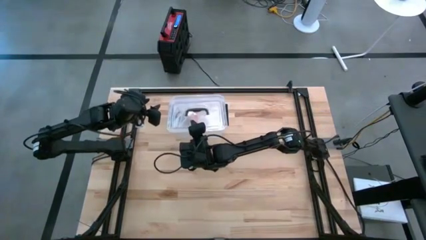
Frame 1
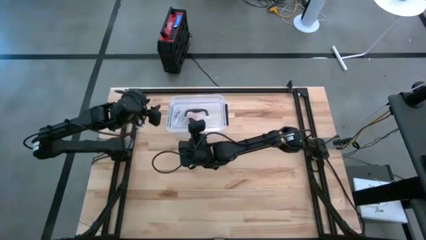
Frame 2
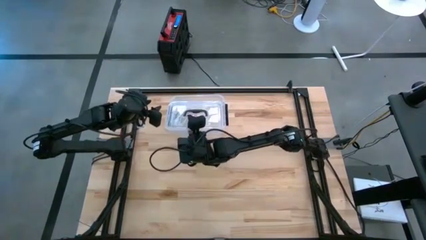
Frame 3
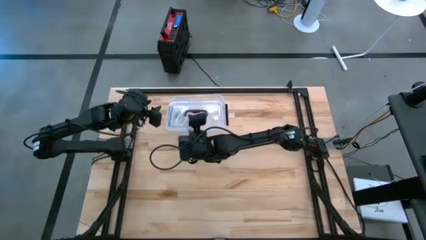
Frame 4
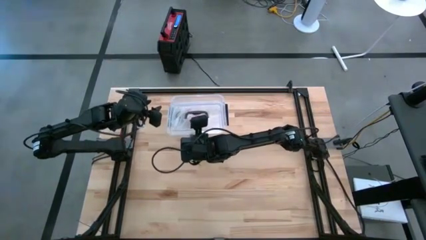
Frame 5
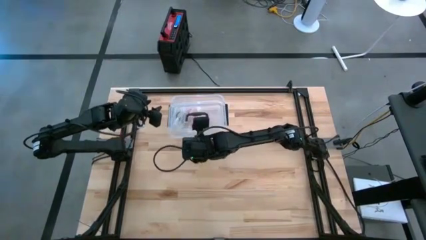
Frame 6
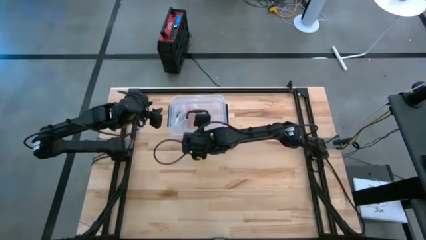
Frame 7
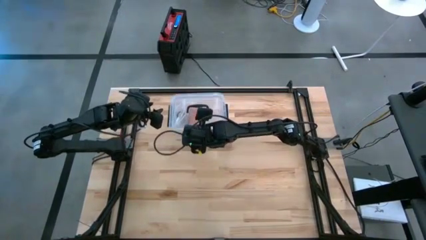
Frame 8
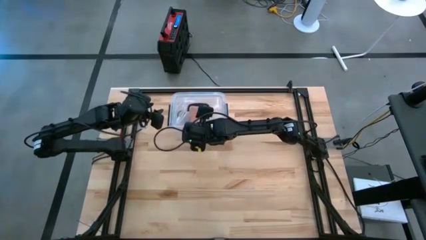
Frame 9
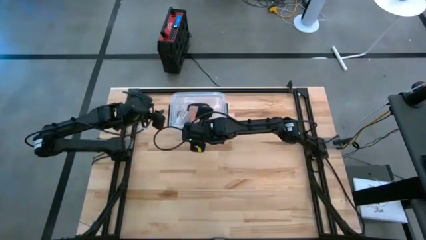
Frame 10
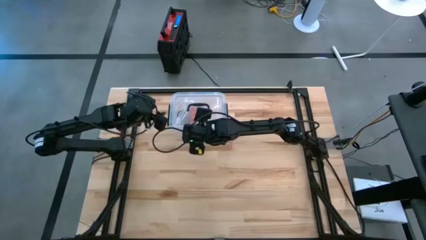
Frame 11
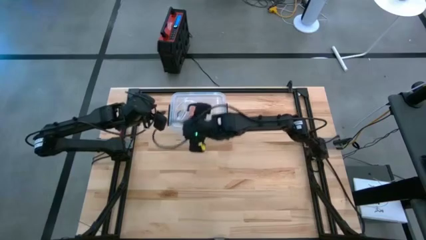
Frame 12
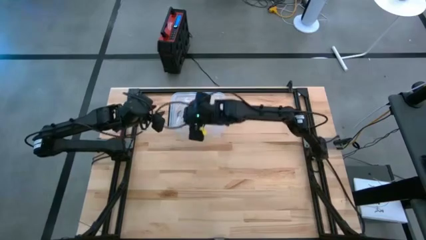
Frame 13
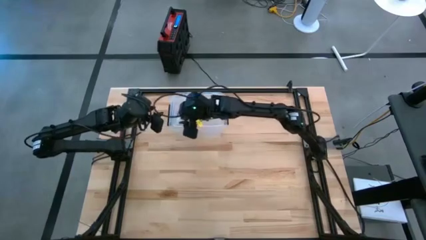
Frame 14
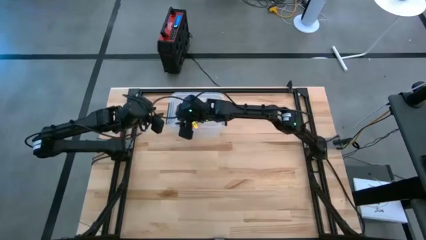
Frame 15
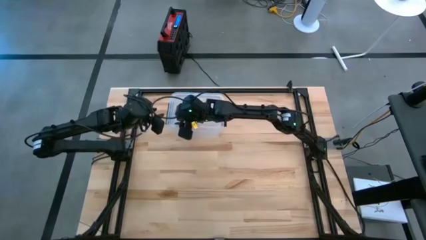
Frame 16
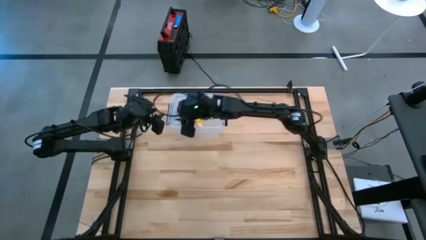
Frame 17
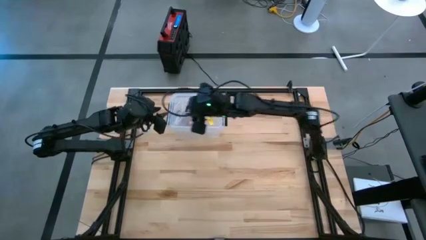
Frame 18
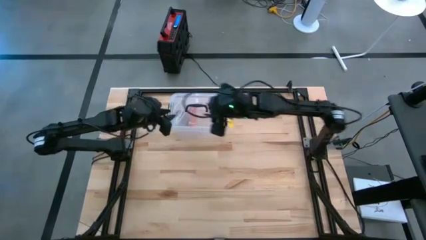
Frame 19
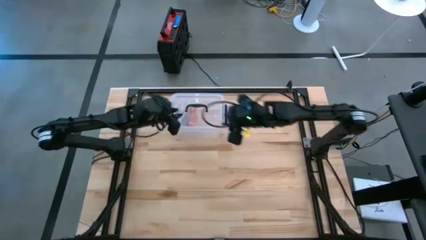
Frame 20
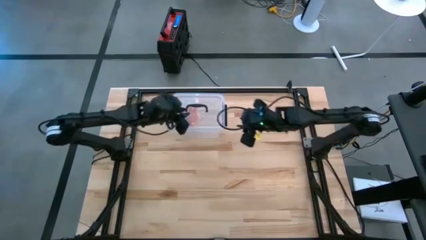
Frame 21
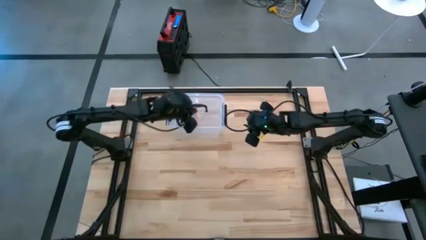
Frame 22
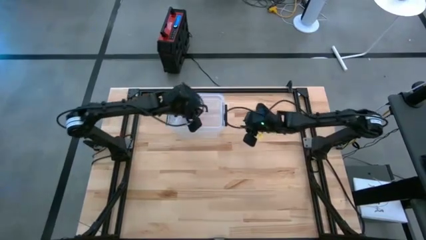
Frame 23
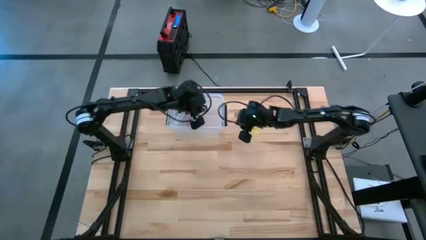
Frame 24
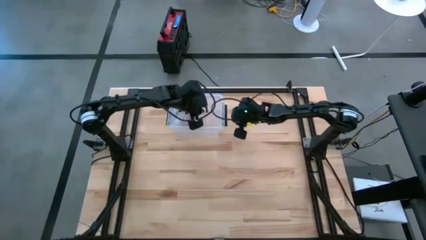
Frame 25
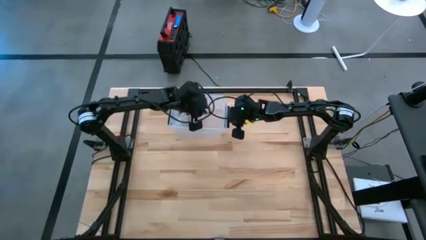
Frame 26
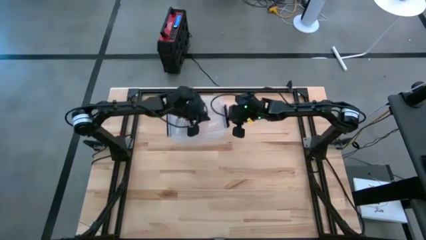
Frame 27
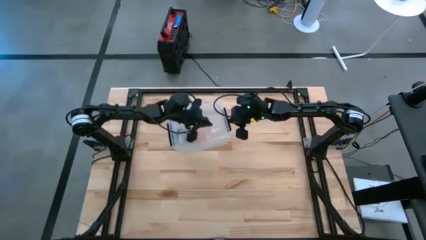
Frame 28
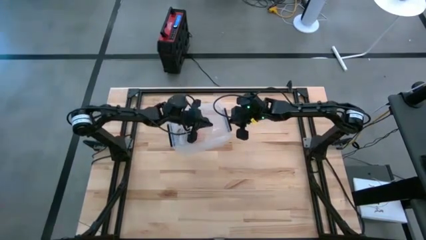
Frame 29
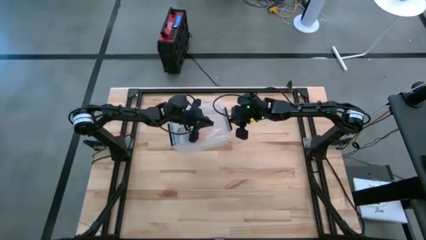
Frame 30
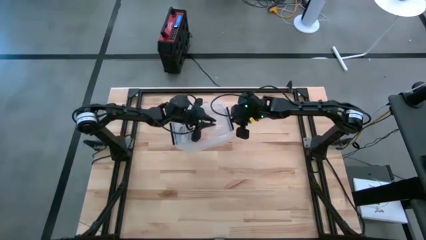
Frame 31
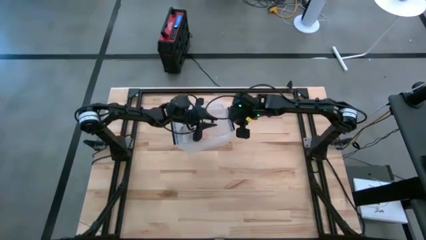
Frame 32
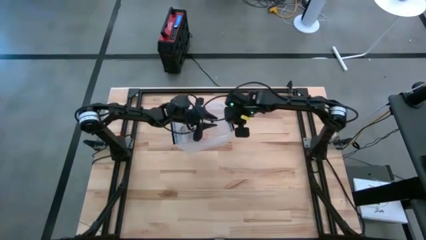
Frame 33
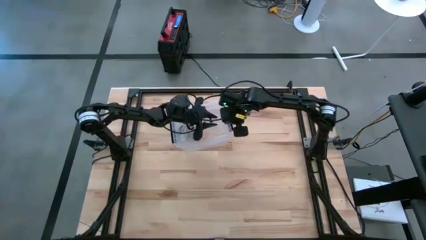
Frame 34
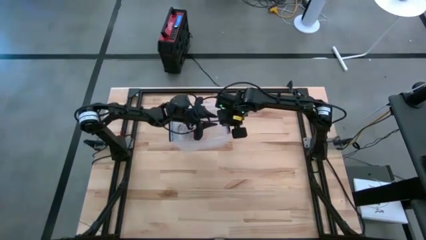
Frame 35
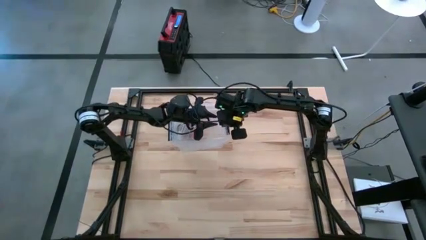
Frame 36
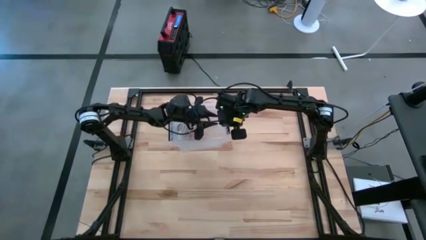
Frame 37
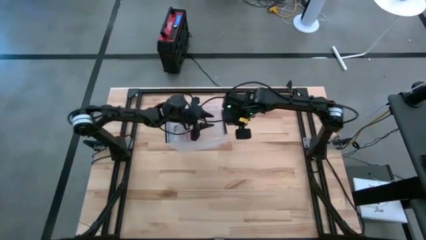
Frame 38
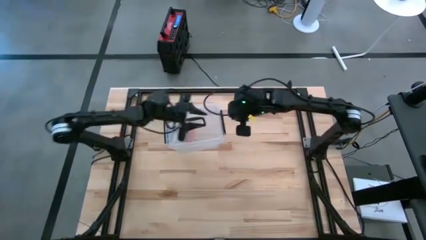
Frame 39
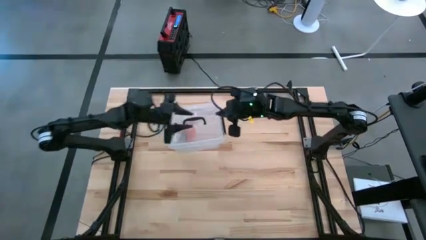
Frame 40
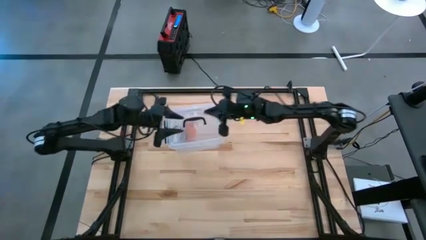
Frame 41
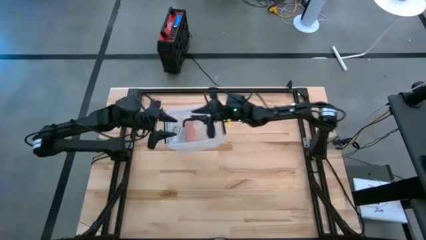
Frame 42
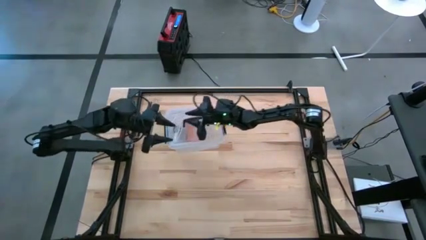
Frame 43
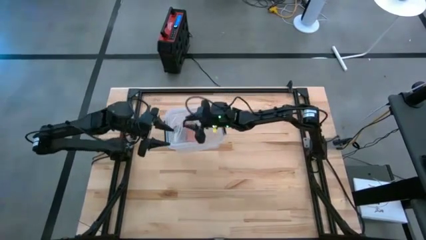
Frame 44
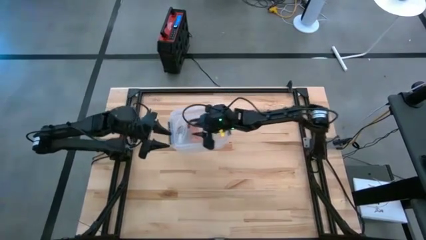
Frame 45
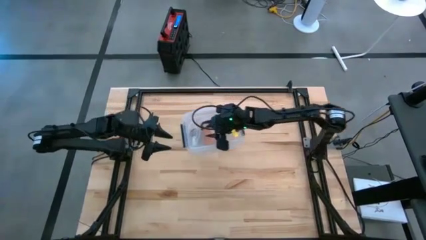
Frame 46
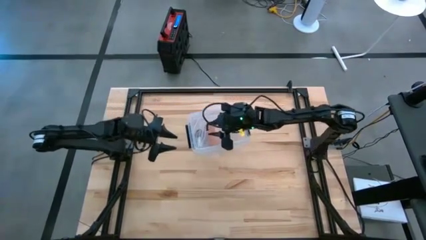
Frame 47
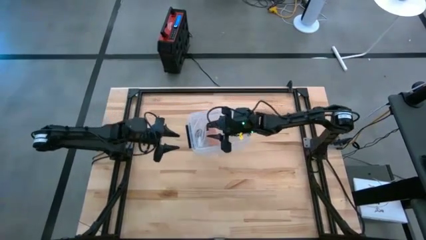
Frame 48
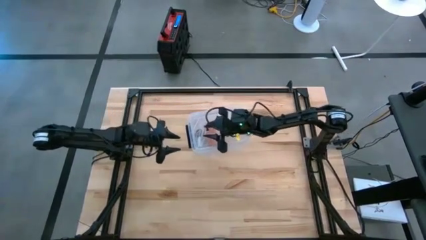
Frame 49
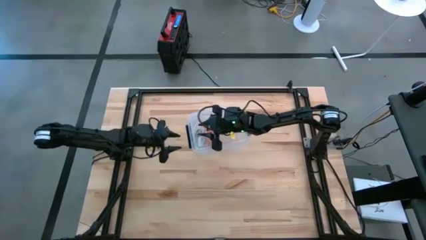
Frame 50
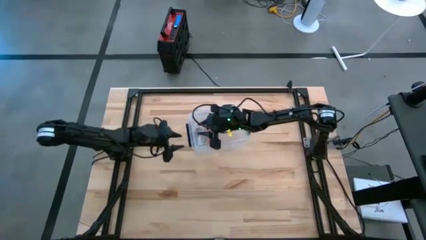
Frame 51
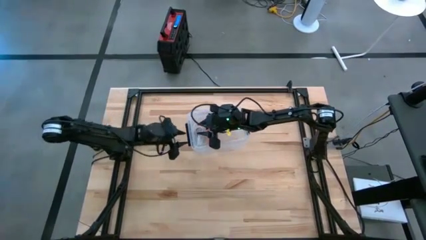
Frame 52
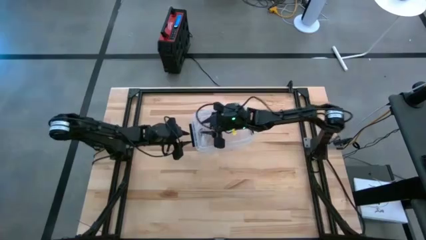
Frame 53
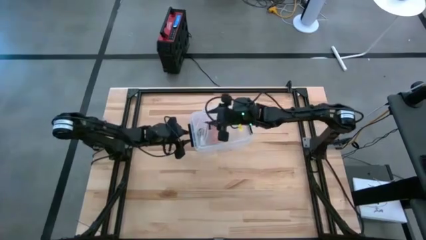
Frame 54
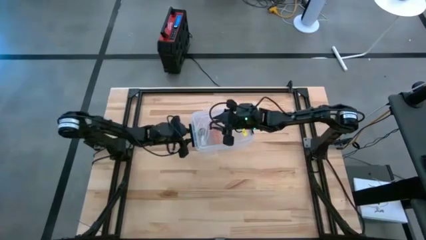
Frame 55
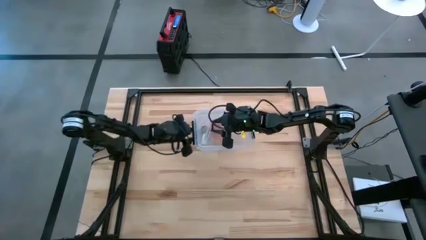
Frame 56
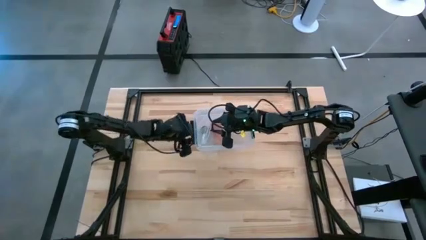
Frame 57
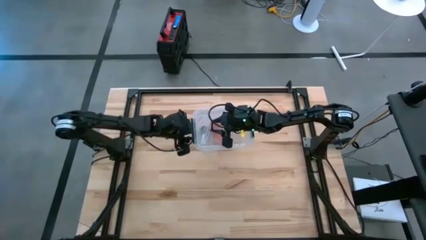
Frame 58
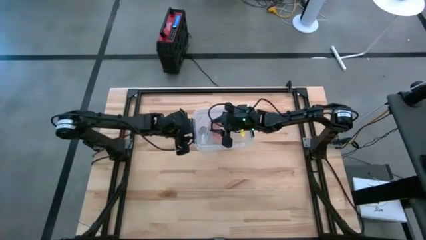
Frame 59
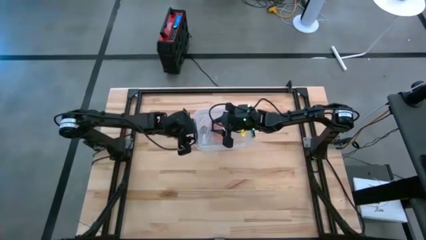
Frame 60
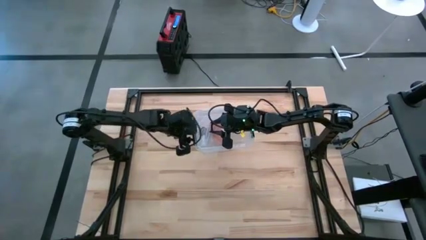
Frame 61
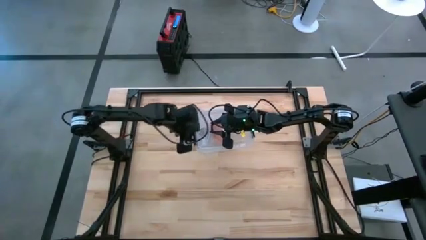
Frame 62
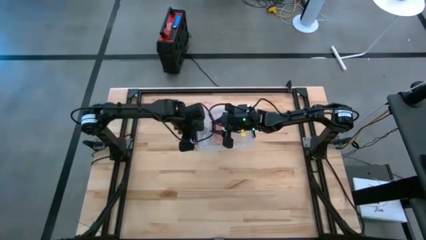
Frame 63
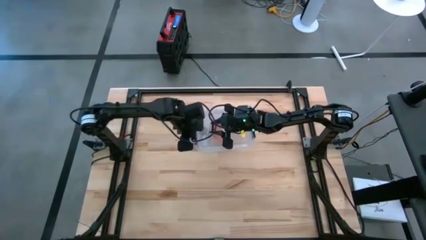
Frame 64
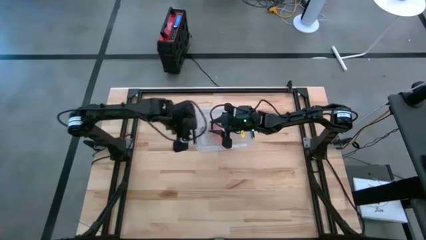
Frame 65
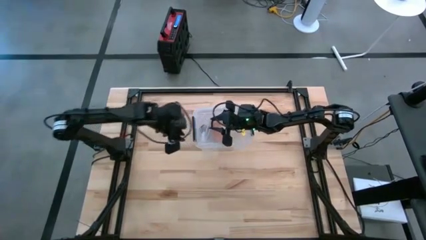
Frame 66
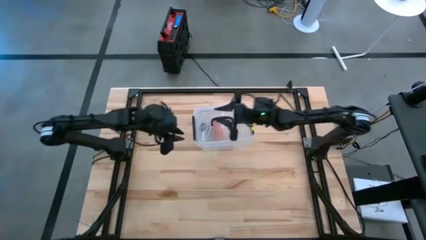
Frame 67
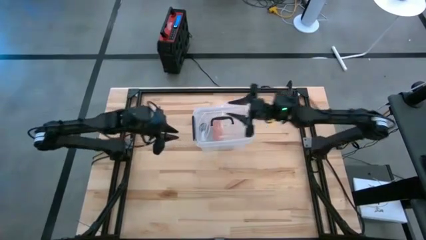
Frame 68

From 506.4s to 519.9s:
Task: Roll bandage
Close the transparent bin

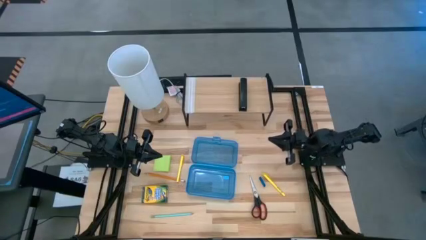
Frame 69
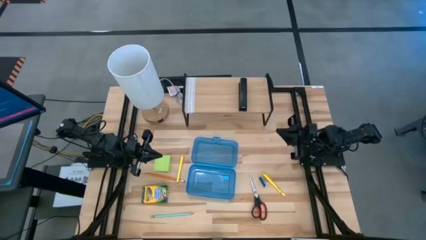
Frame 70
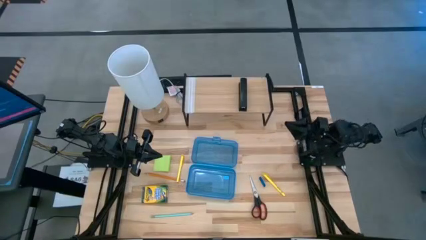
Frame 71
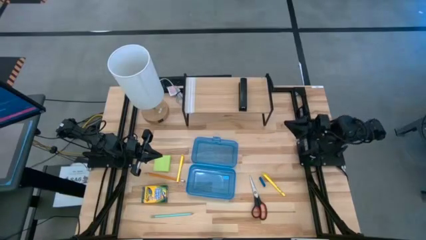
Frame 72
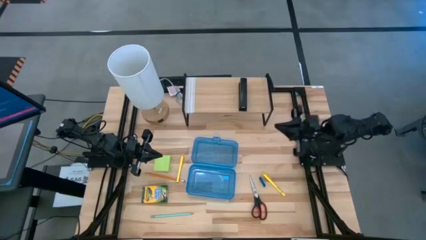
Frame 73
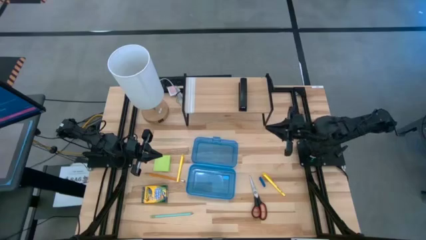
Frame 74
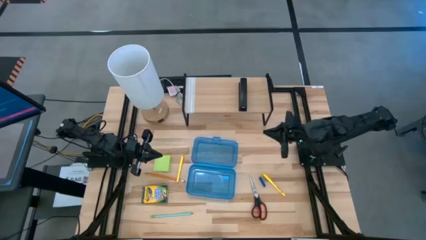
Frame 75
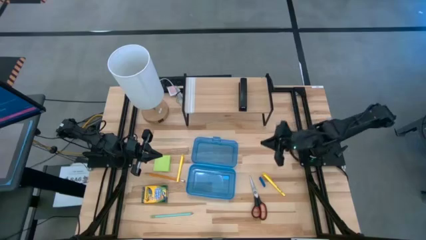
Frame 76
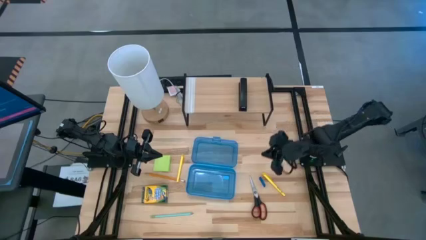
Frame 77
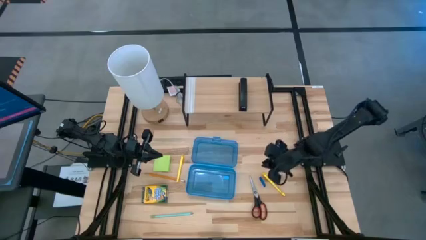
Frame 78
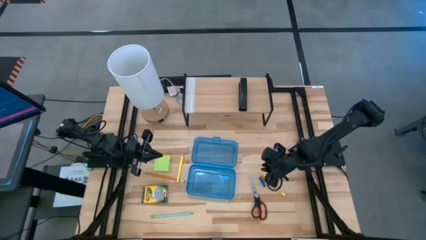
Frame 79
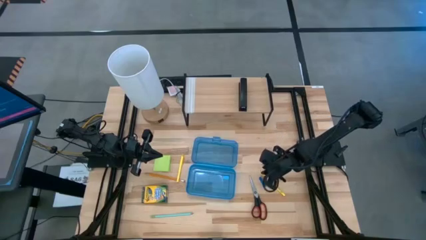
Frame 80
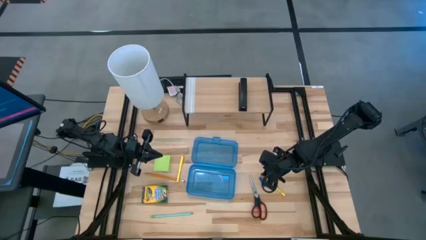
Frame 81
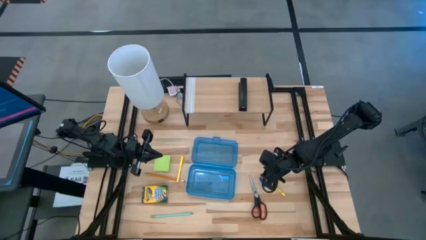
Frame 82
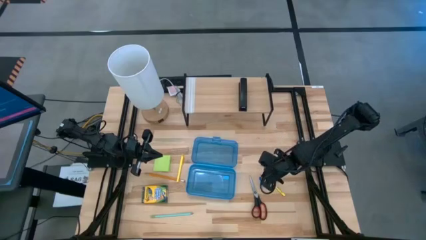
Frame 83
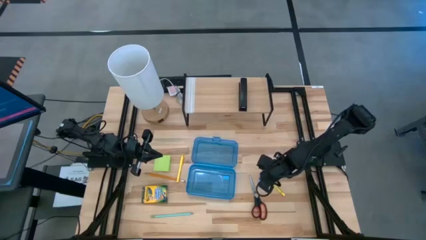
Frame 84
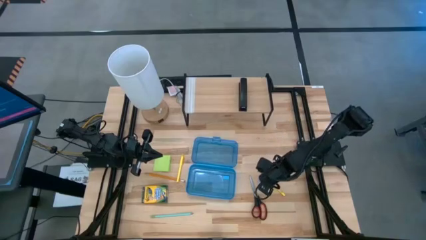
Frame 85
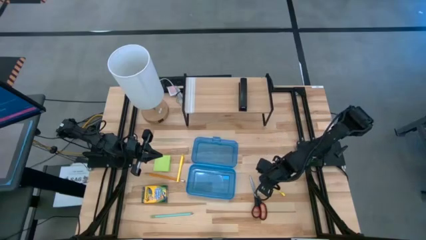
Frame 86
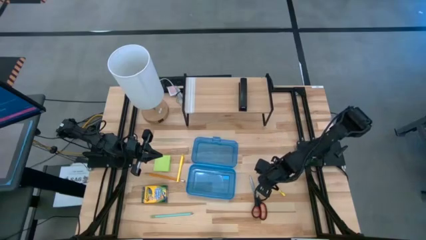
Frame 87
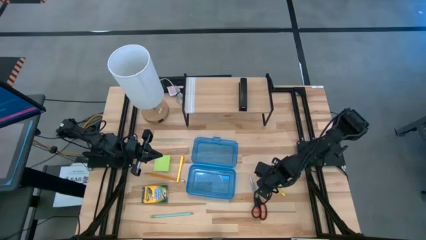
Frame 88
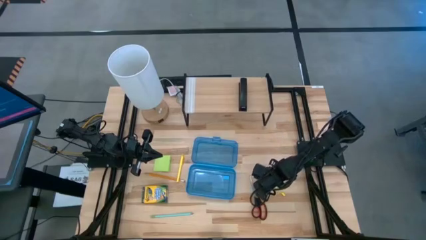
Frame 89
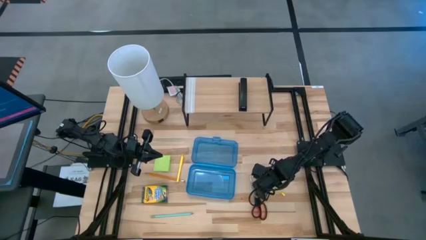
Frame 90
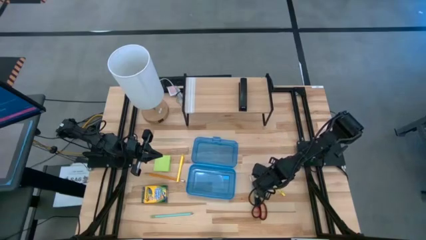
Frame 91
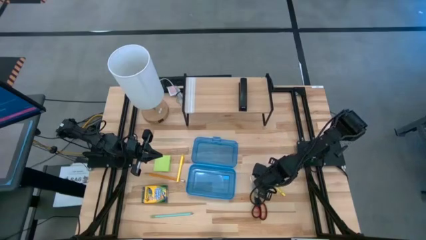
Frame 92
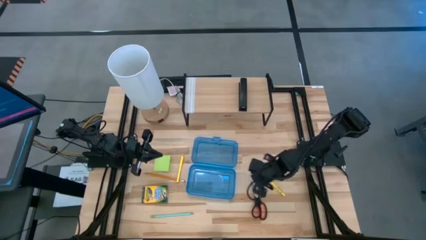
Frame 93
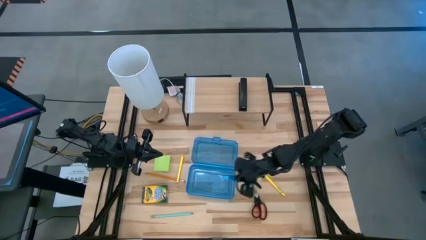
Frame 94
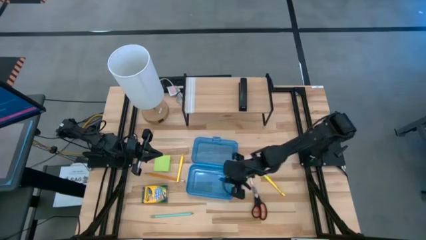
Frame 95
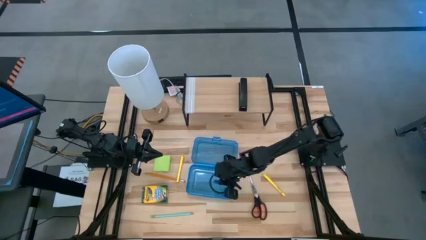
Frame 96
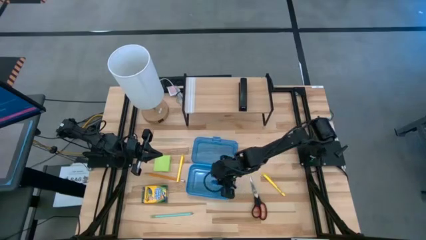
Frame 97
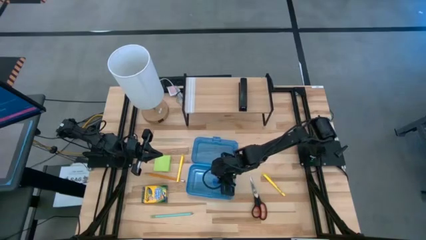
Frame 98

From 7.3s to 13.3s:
Task: Pack school essentials
Put the blue eraser into the blue supply box
